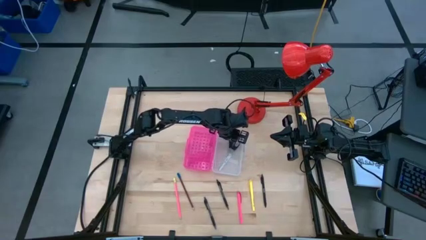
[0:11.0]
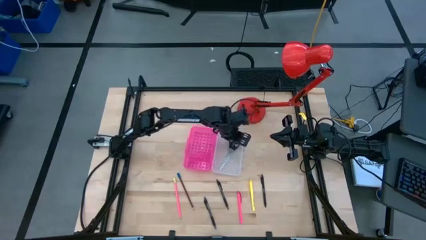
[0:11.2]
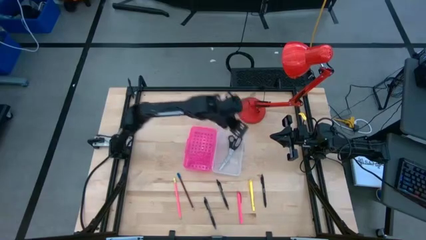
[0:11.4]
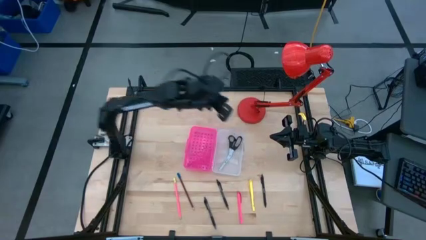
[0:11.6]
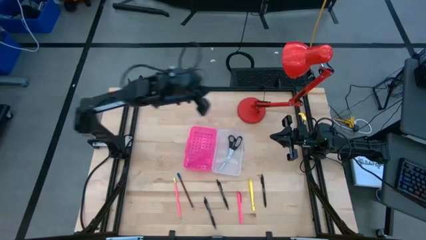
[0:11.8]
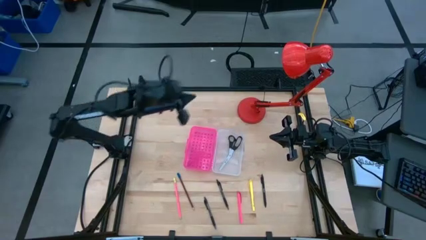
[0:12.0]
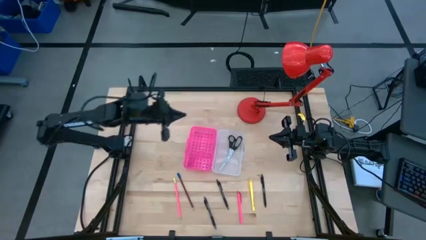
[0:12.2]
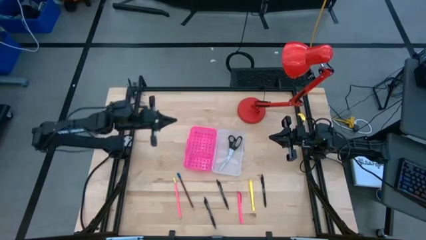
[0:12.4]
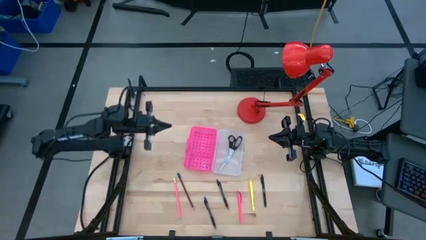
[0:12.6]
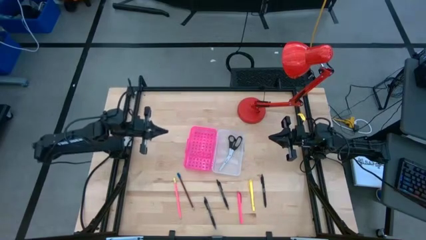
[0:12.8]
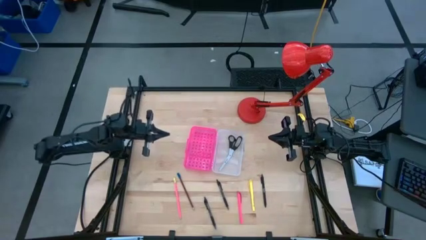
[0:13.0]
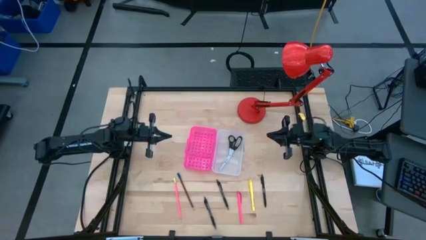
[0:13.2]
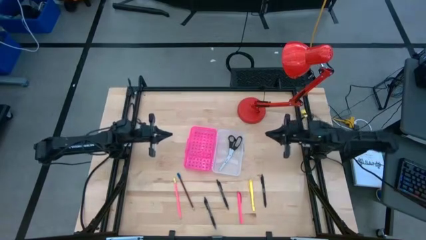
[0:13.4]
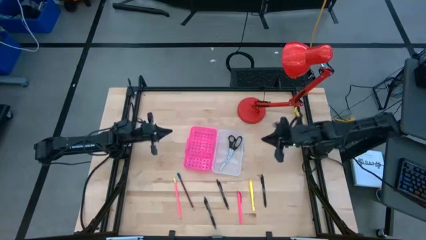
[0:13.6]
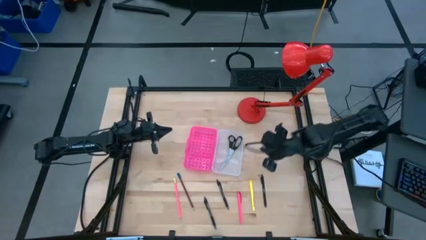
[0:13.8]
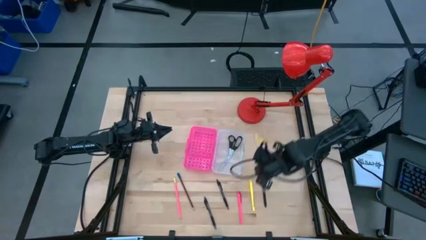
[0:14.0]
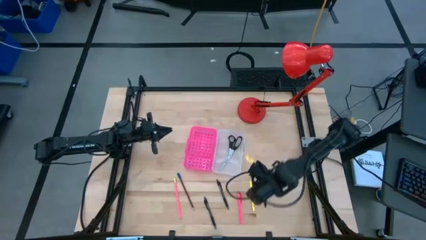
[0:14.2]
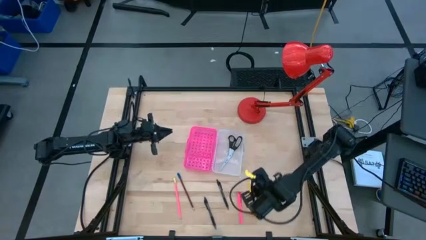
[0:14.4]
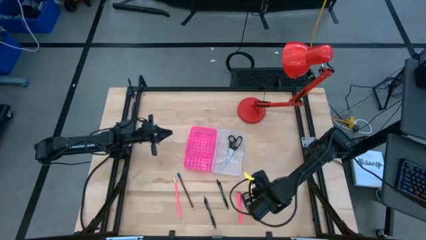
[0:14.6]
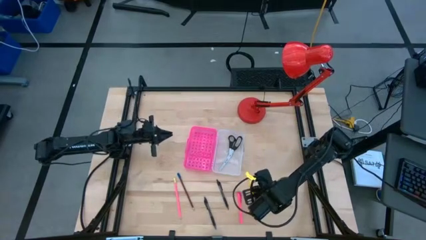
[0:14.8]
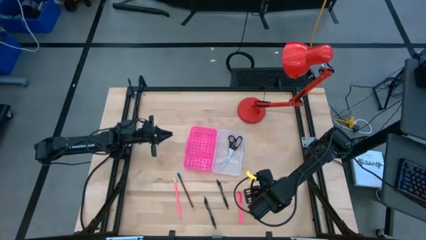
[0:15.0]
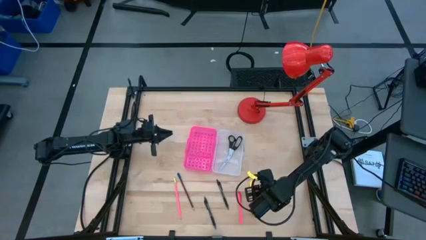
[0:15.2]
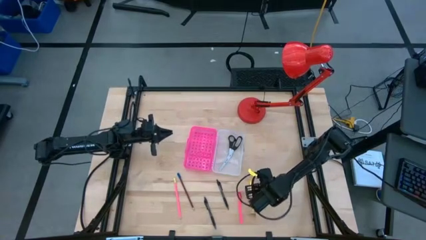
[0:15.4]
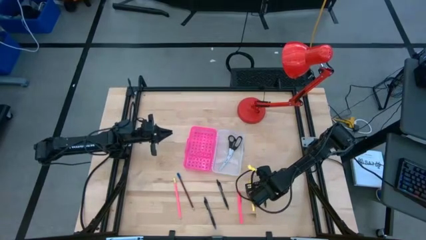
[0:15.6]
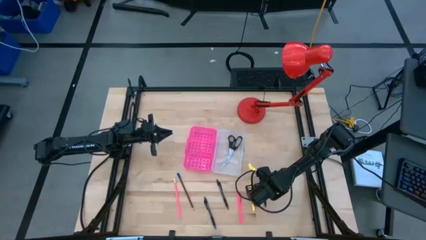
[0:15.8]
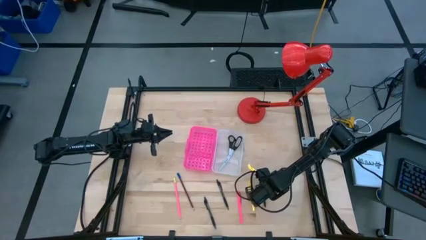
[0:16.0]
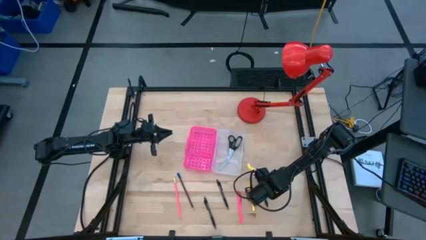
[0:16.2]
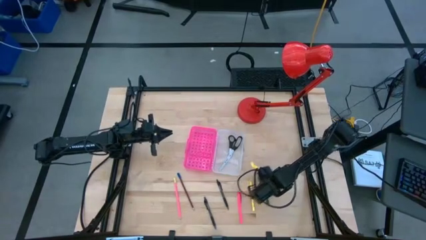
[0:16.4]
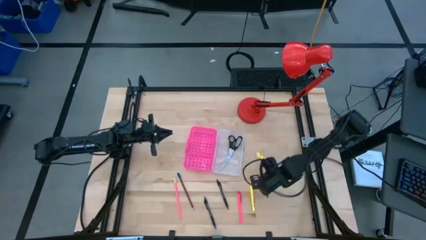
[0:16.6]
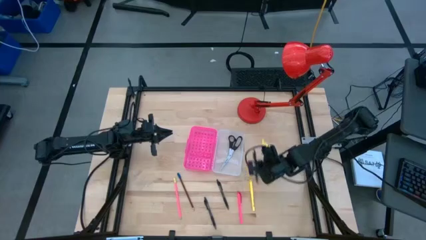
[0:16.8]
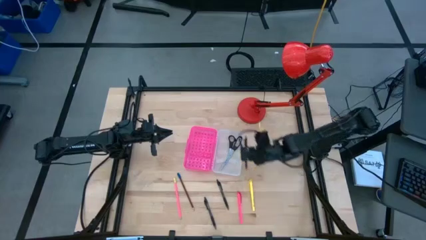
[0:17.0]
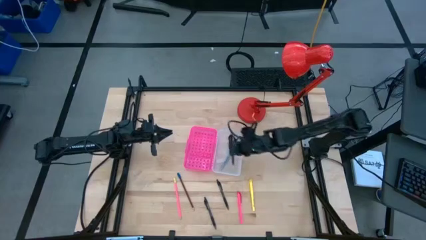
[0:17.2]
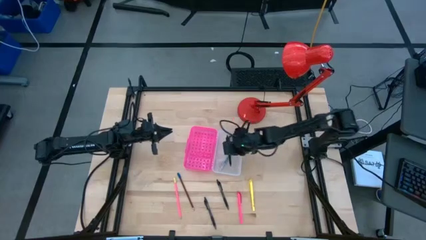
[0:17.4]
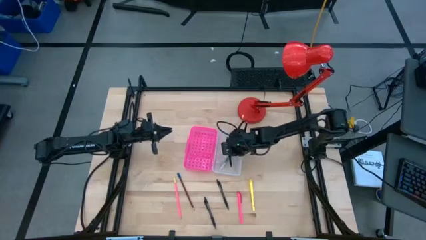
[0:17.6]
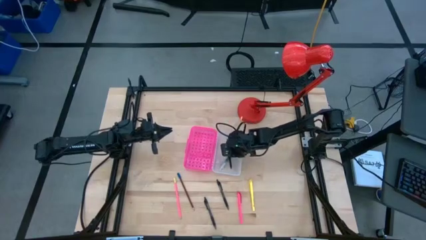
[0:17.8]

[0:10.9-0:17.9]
Task: Pick & place school supplies into a supply box
Put the right black pen into the pink supply box

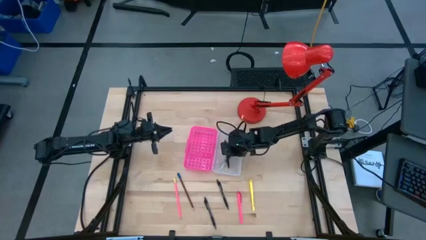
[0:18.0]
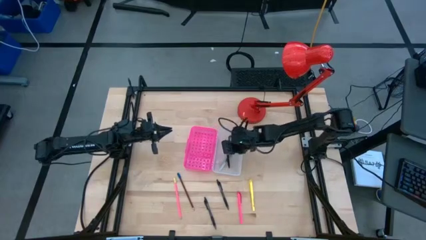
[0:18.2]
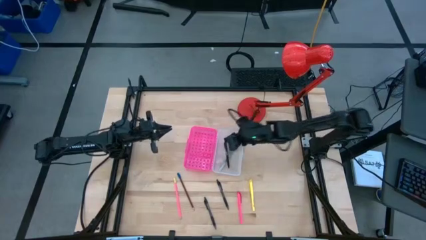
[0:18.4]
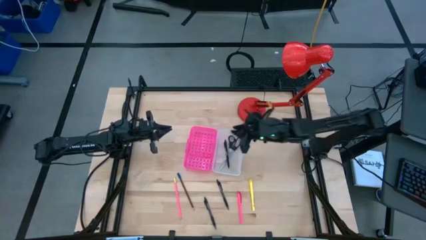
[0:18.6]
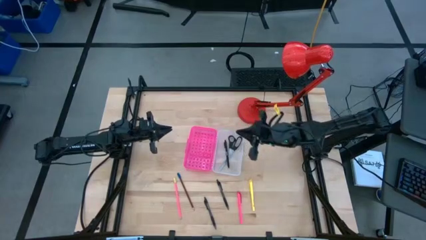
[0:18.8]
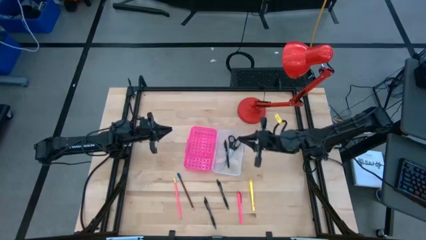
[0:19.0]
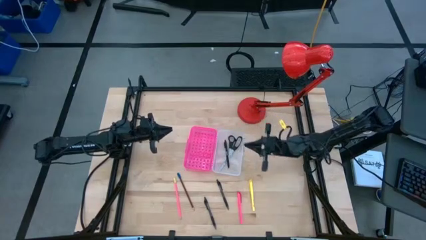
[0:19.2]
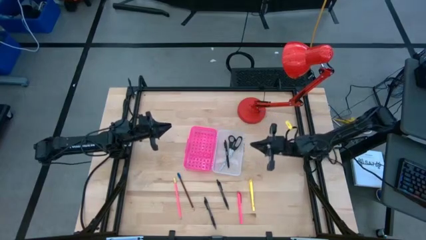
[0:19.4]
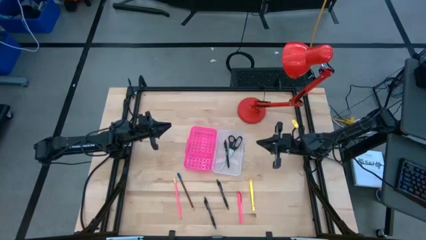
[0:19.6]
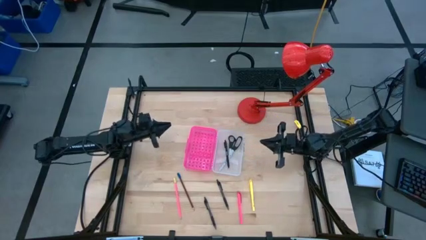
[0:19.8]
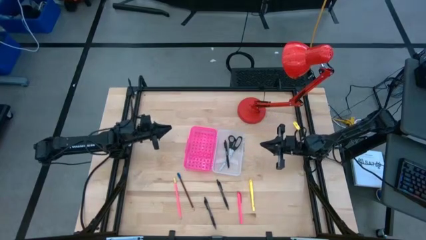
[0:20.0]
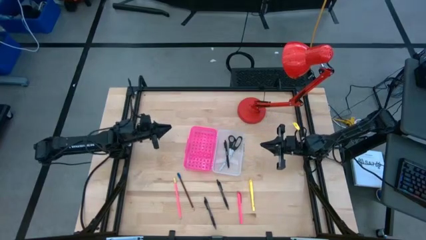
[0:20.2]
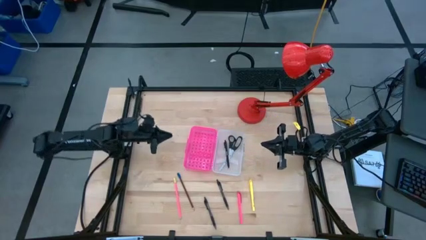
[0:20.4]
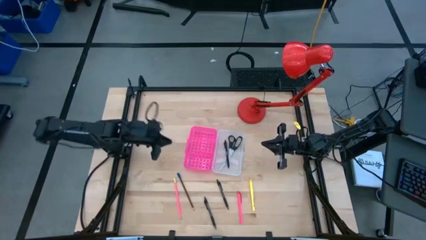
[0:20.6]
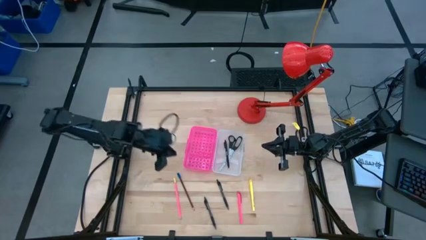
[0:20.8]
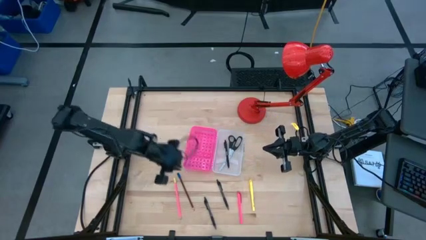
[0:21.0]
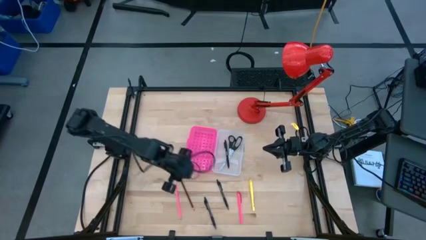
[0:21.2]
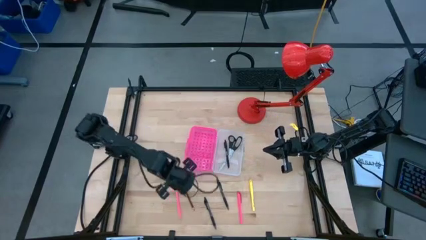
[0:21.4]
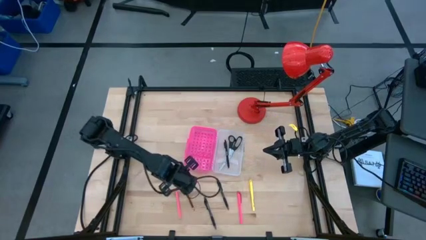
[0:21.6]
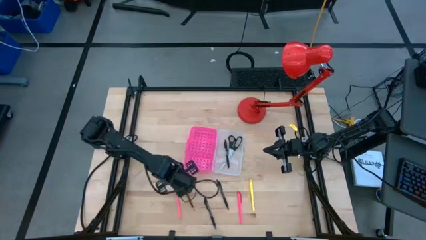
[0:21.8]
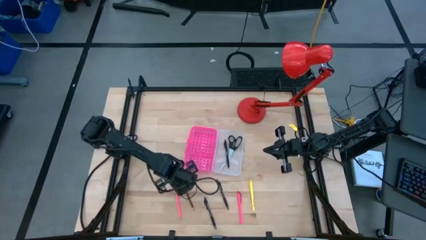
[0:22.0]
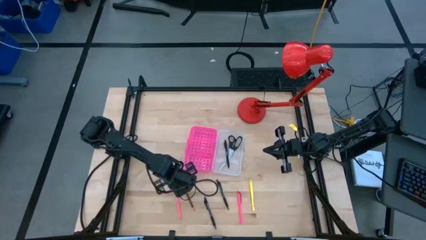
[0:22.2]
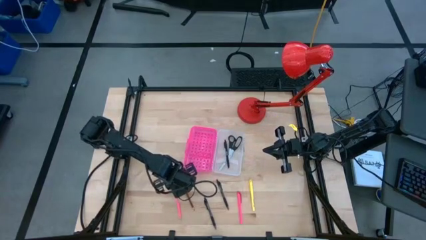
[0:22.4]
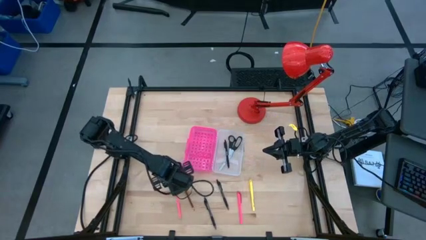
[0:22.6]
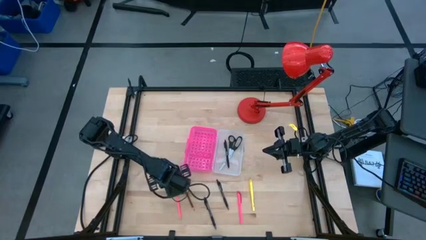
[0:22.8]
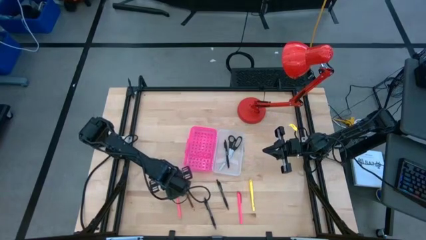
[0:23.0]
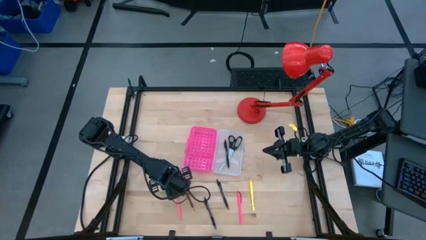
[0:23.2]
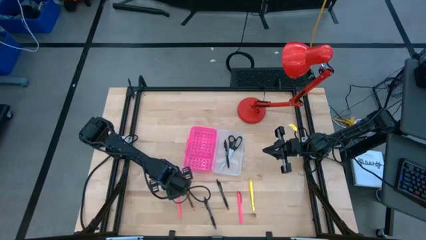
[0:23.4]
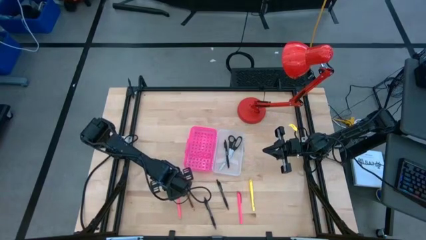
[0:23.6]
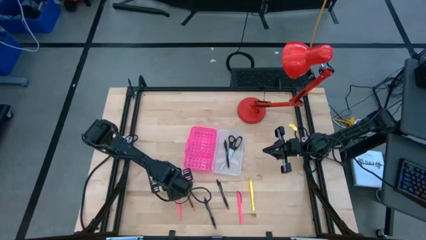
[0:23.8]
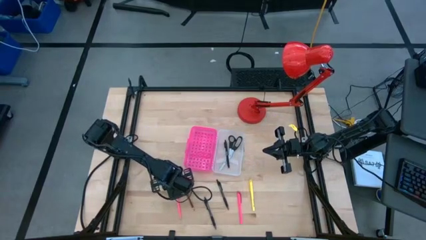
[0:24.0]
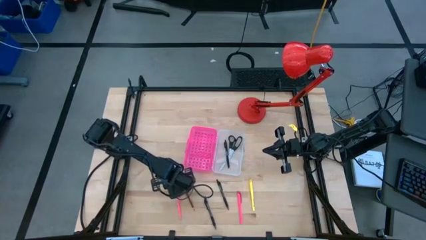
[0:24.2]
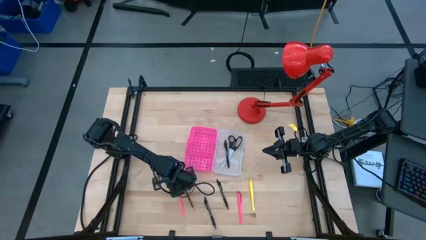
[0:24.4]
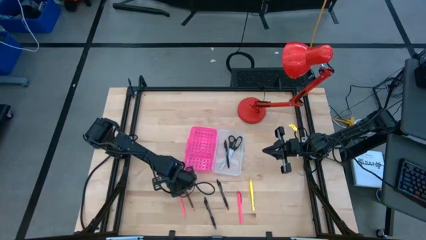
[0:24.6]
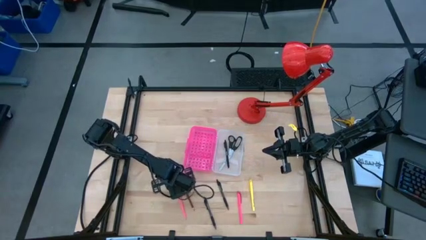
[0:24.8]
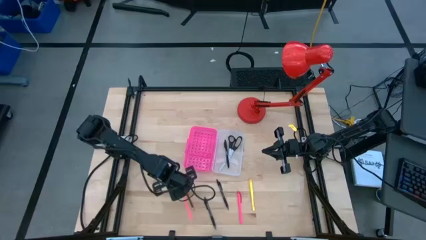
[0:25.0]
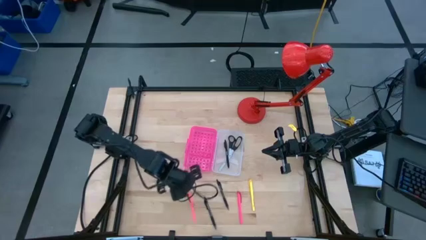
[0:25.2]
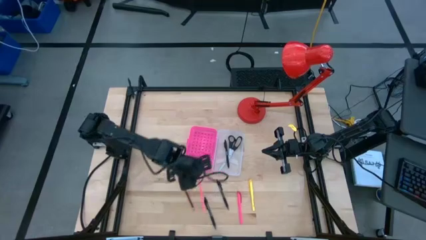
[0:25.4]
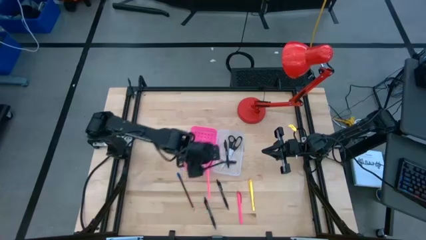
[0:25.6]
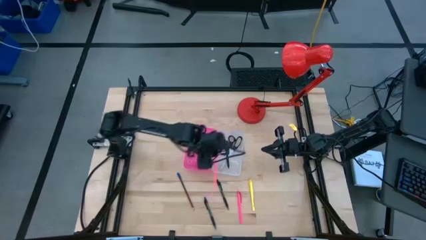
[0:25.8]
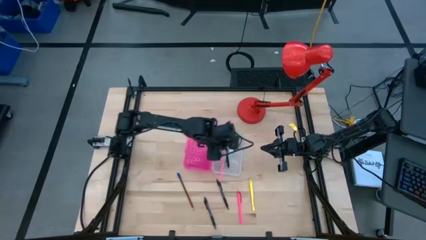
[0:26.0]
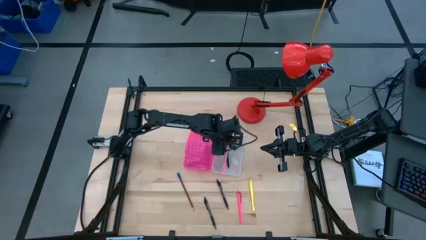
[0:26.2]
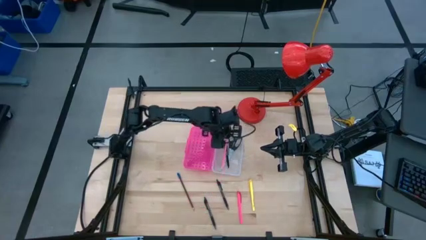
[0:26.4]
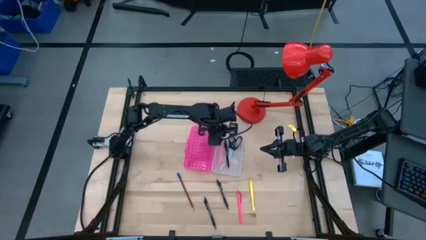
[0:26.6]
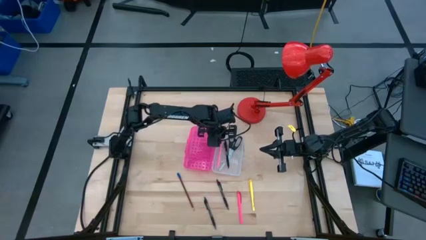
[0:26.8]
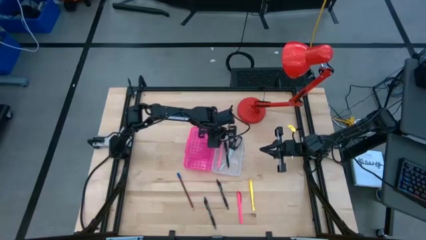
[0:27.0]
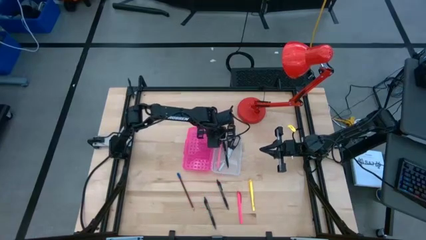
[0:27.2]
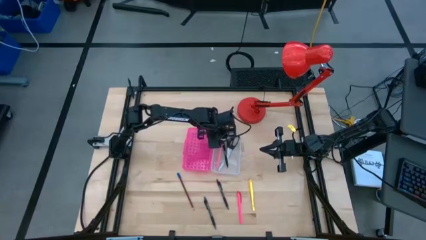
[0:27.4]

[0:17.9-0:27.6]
Put the pink pencil into the pink supply box
